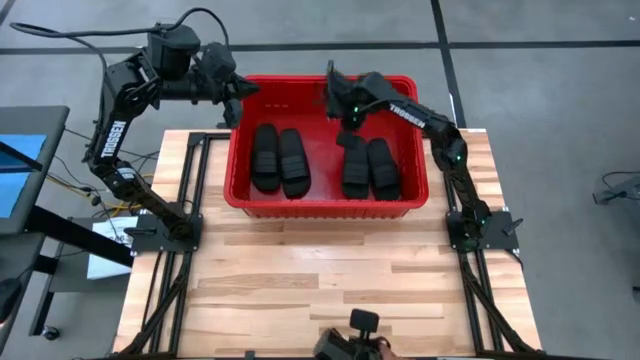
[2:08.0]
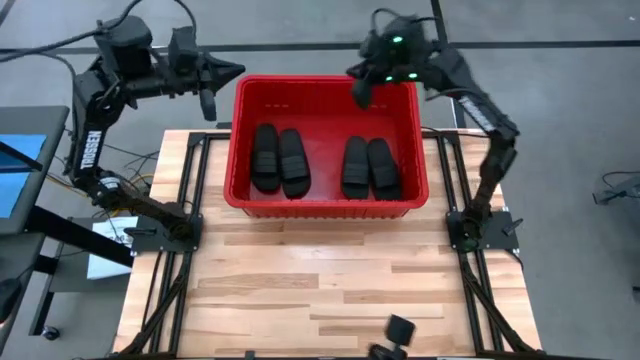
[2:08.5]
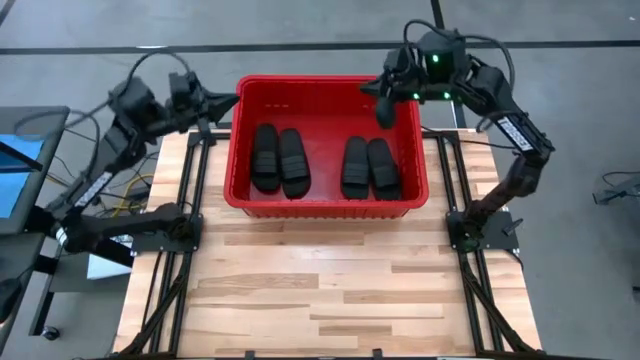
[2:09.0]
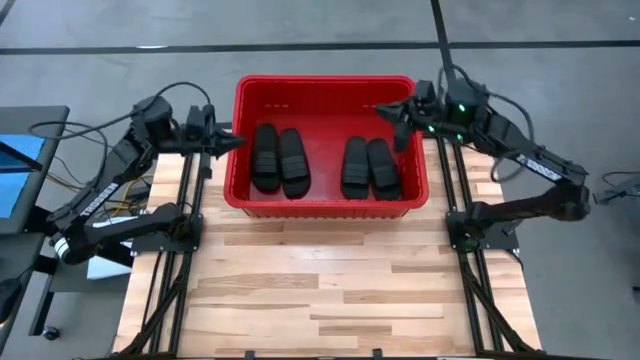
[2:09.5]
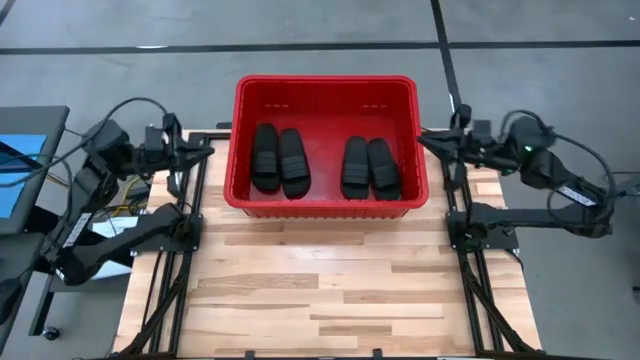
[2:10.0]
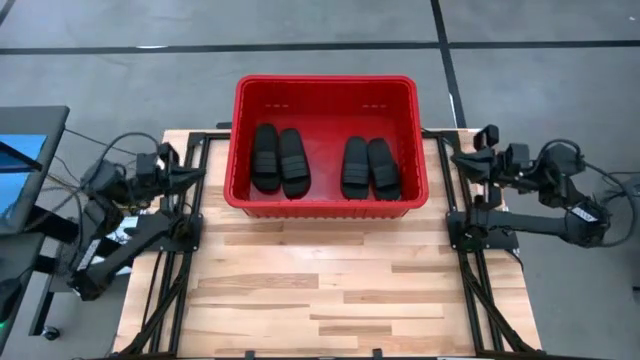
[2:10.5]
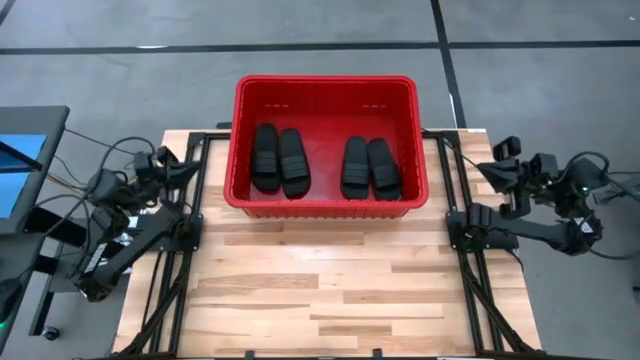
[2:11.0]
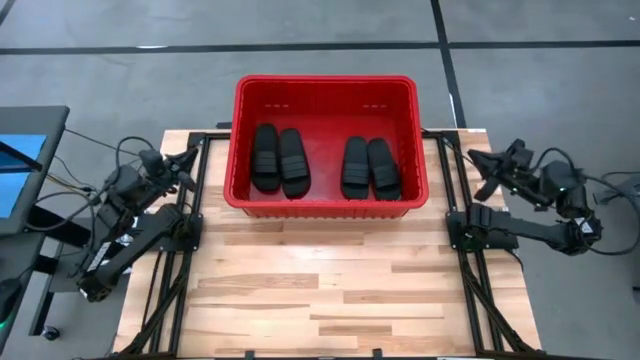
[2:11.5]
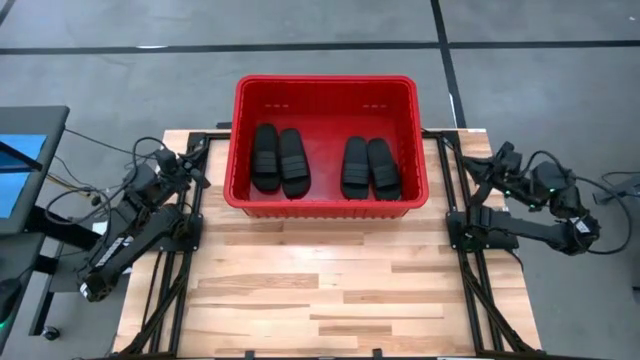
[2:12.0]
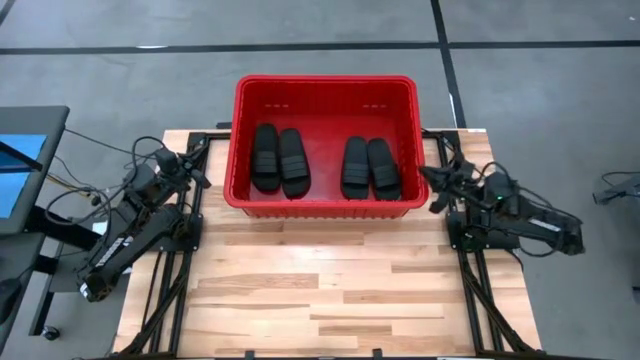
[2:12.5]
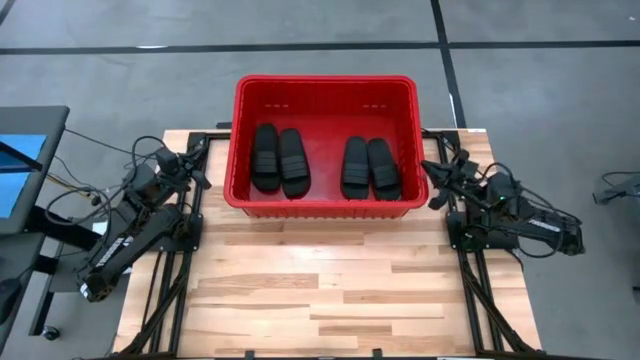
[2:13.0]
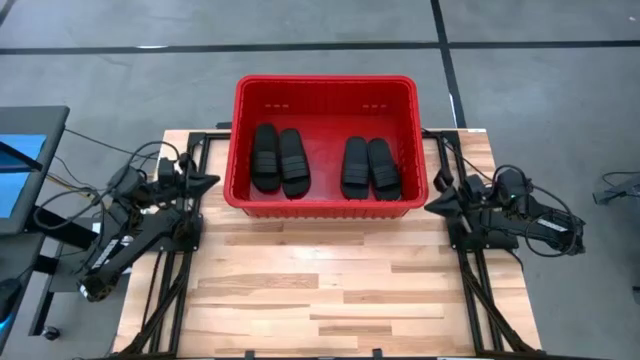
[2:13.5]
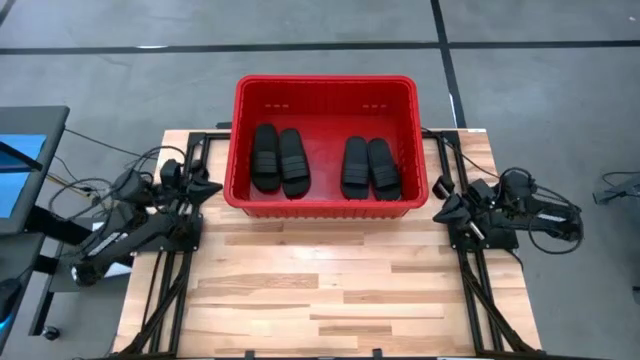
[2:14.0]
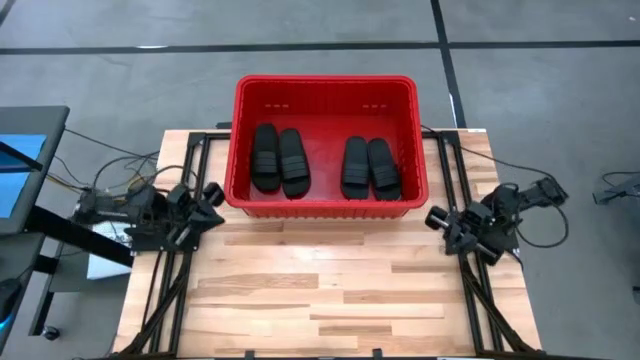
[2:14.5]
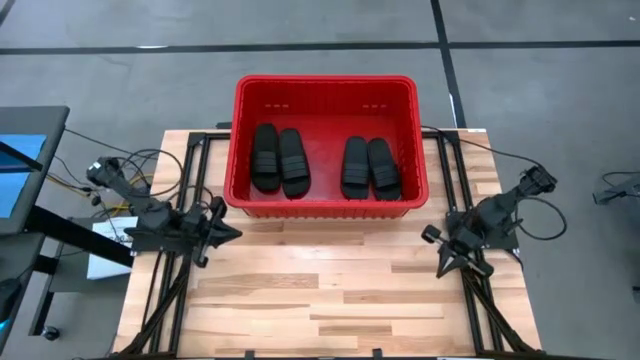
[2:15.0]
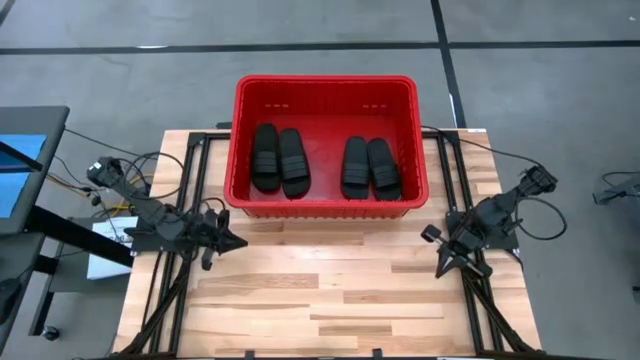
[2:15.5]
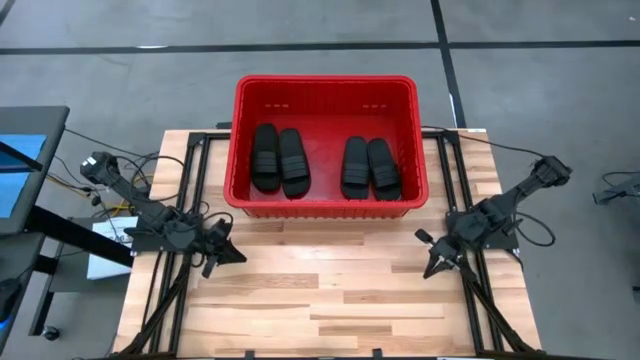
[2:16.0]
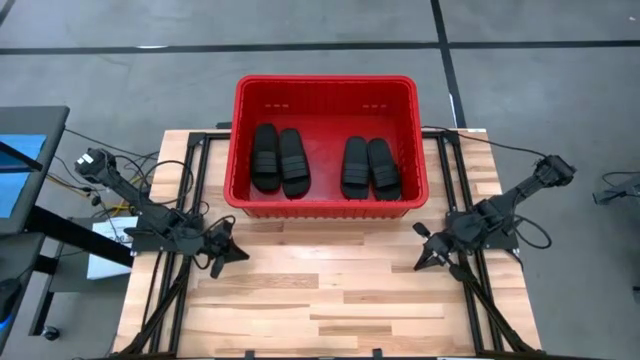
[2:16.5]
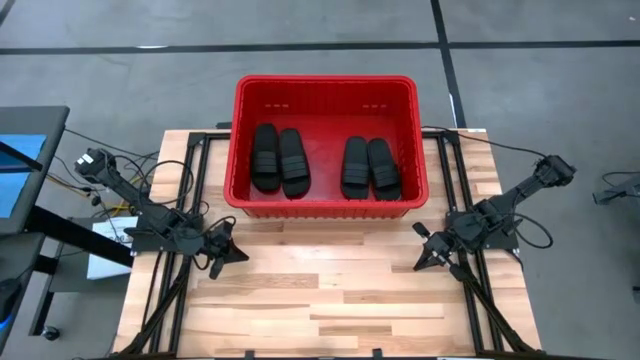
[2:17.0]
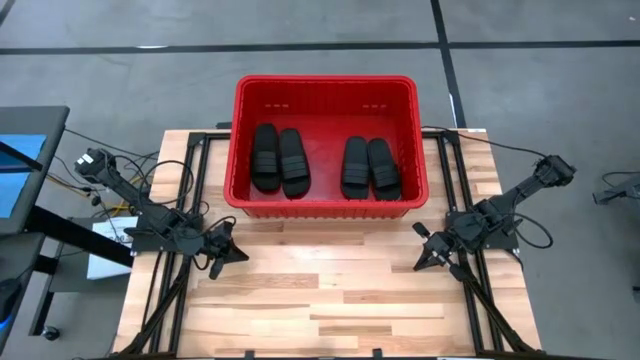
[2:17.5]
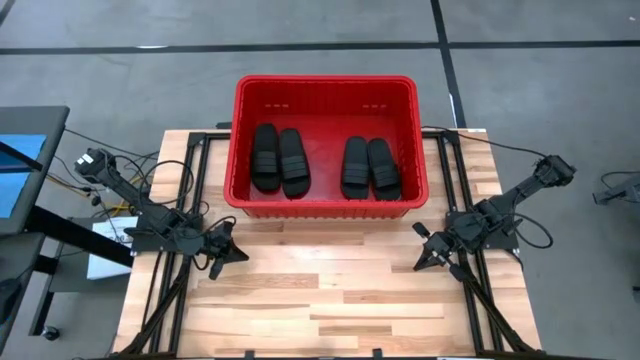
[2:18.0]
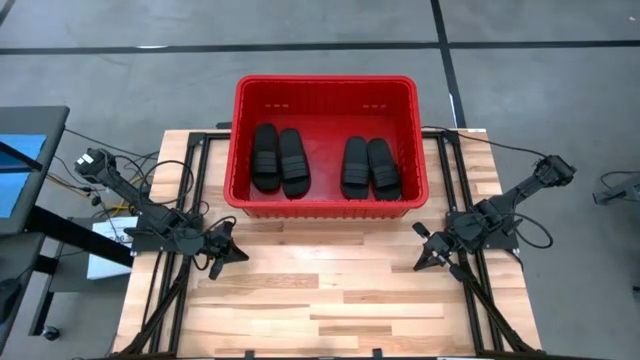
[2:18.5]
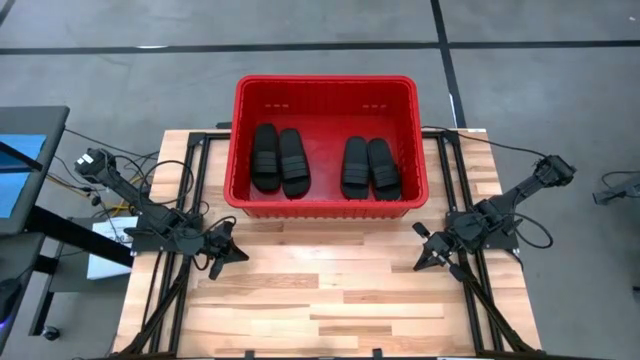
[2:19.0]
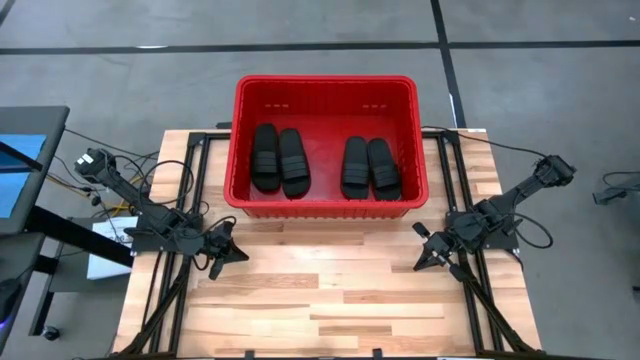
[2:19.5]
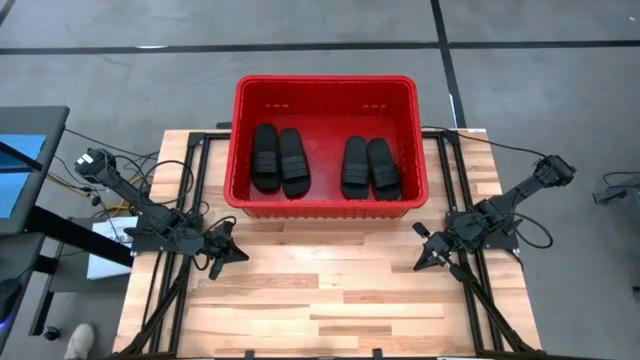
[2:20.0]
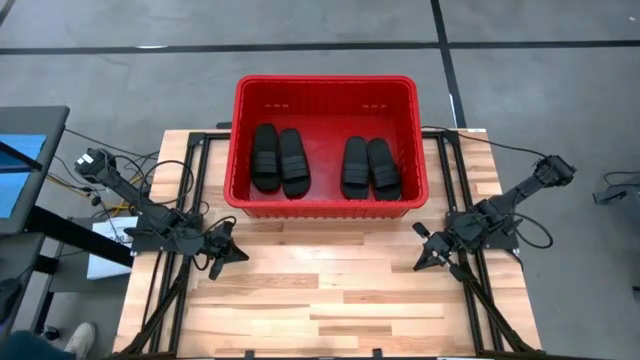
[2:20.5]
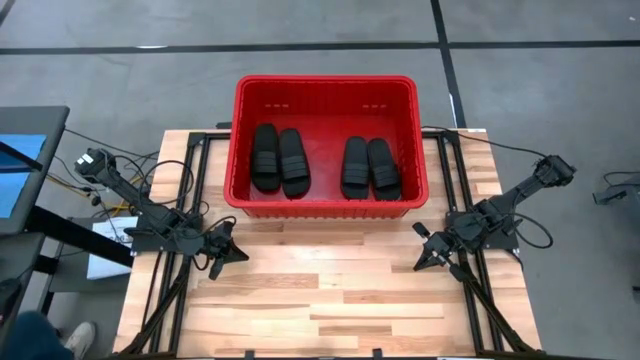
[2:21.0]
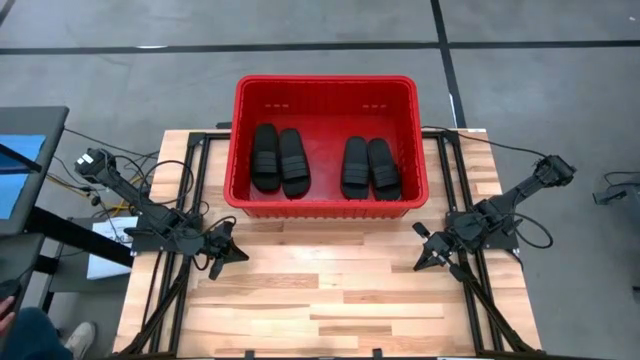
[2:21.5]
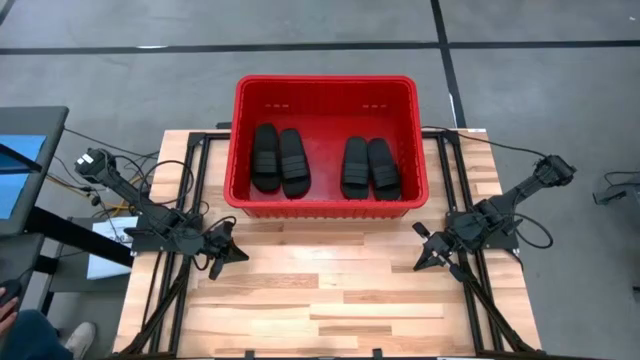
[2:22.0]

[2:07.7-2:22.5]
Task: Pick and place slides into bin
Return to Home Position

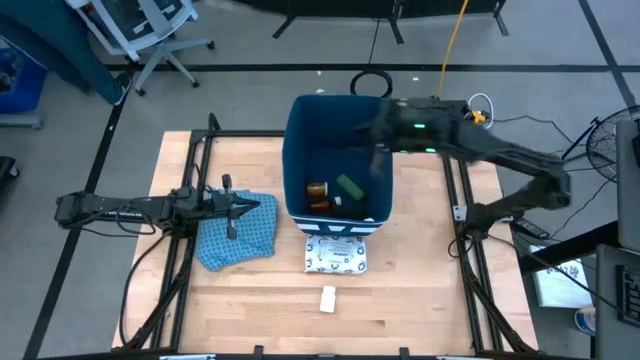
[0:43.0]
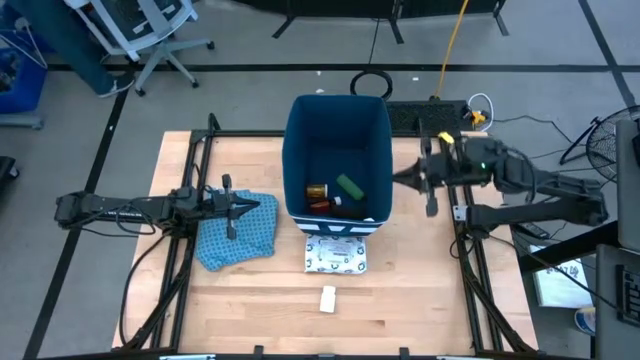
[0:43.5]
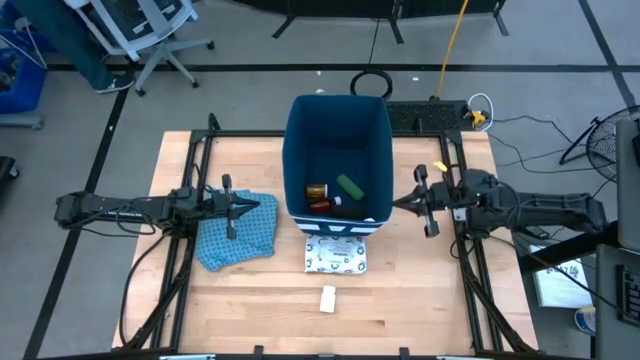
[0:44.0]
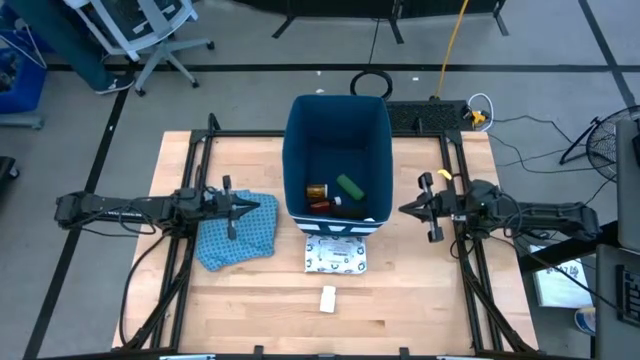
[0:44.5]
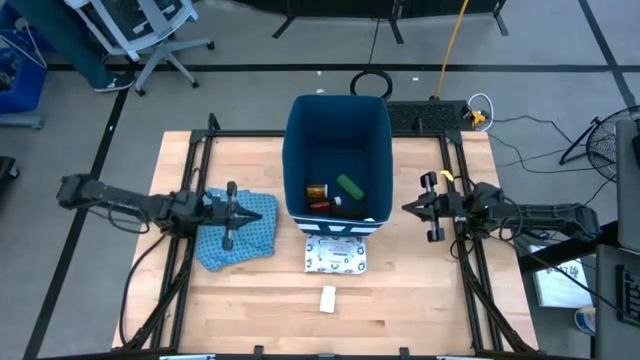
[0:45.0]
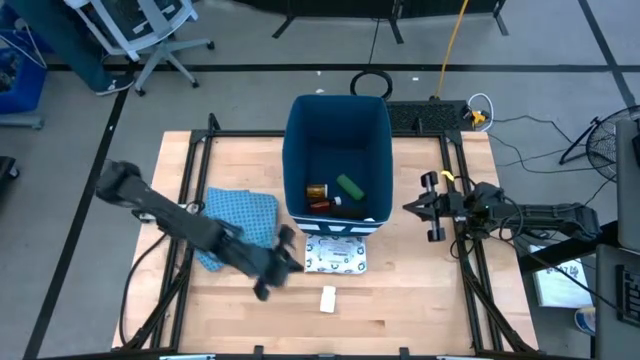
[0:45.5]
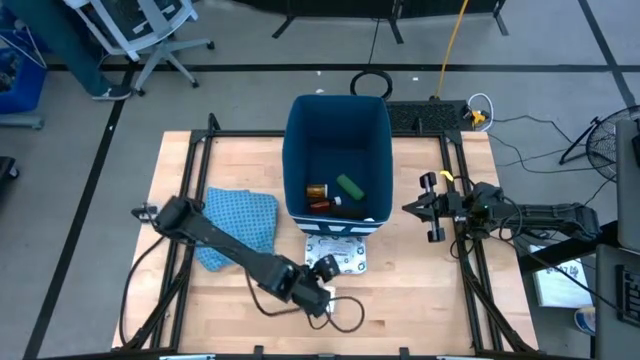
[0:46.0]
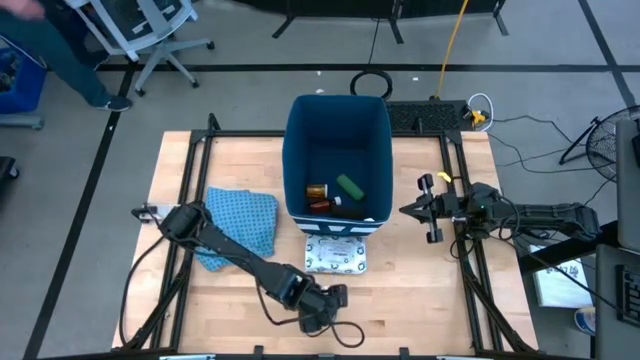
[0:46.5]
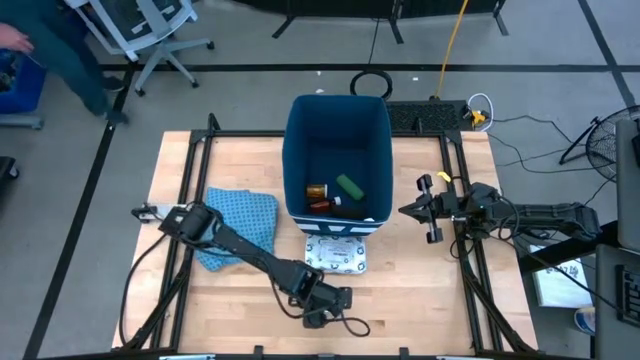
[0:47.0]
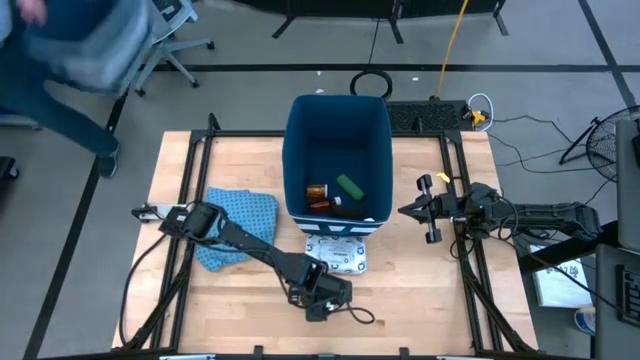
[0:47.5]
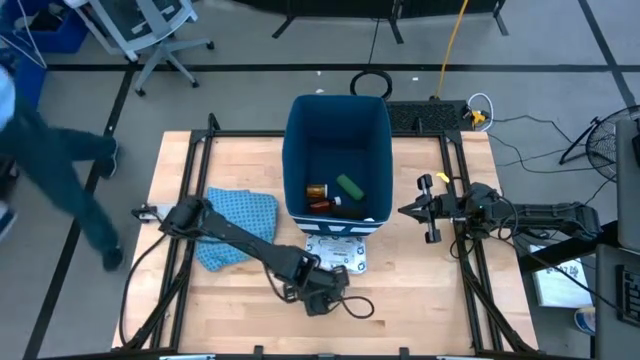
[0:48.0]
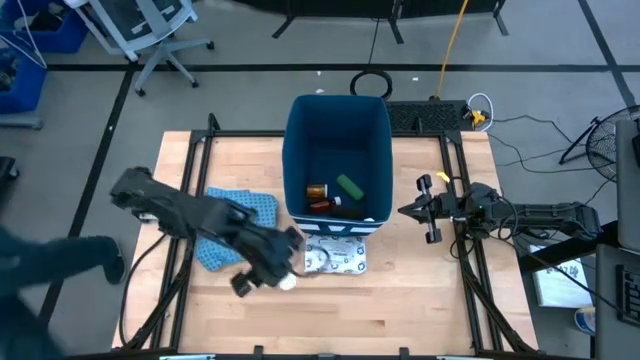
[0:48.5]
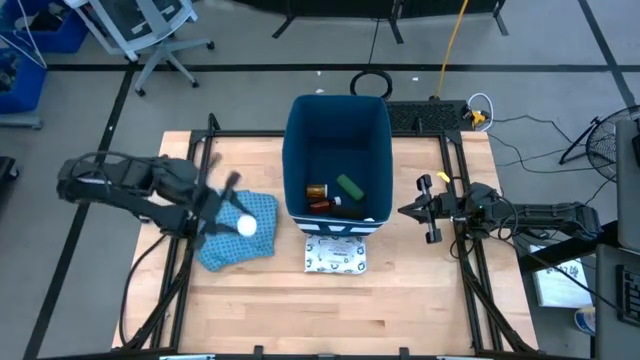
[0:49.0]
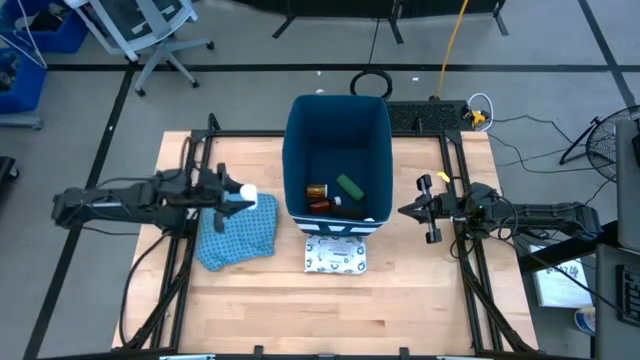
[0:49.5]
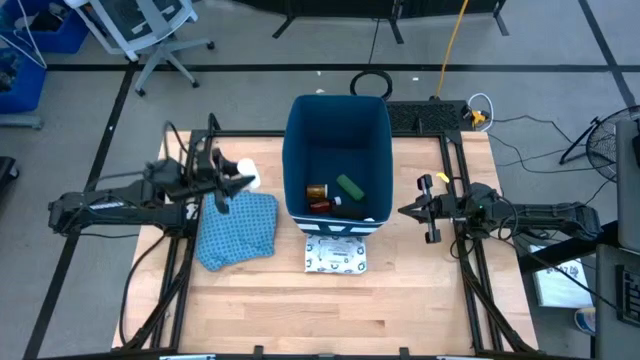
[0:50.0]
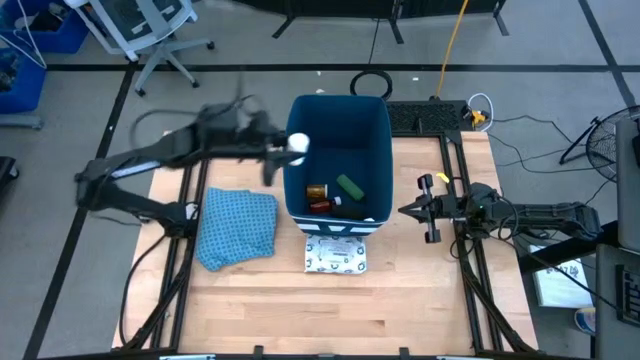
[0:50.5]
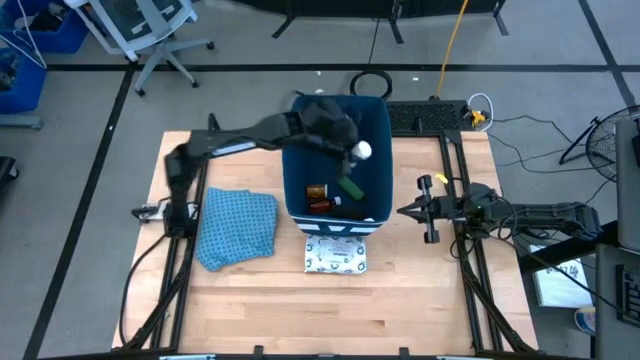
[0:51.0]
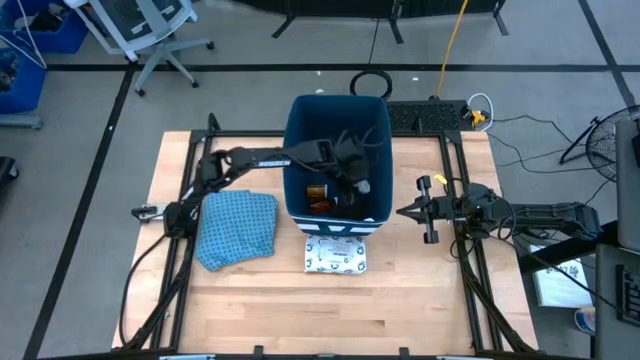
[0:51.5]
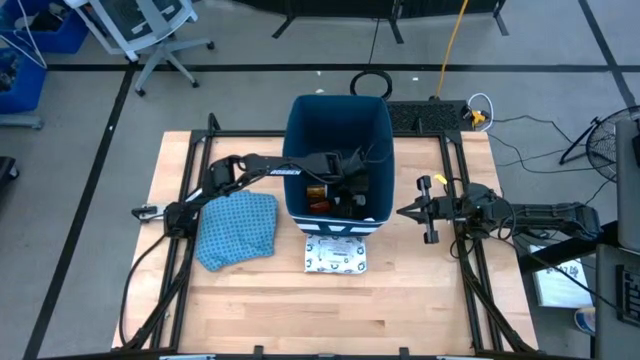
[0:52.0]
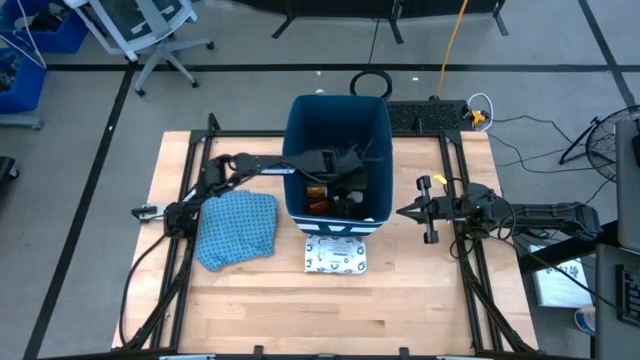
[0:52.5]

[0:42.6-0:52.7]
Task: Pick & place medical supplies in basket/bin
Put the white pill bottle into the blue bin
